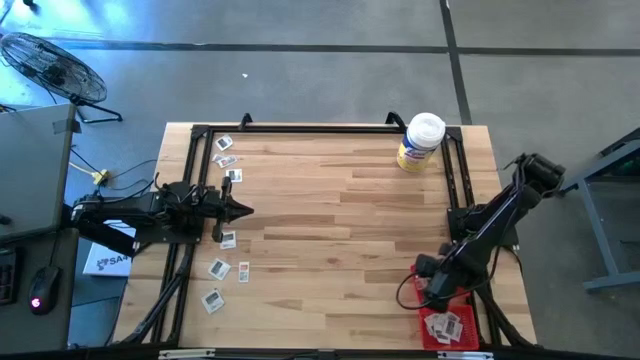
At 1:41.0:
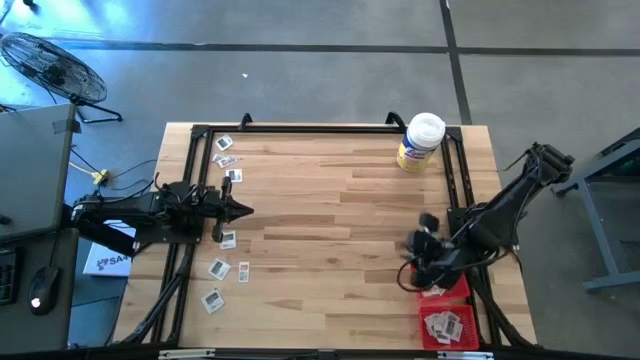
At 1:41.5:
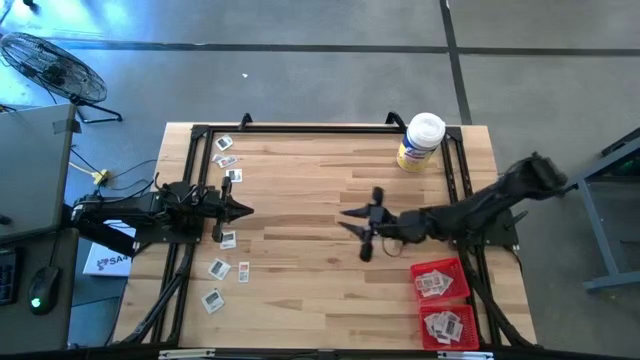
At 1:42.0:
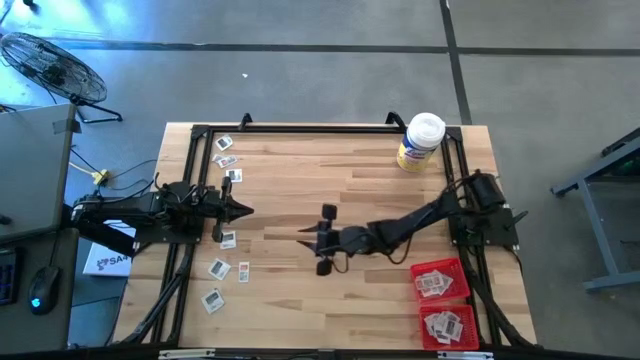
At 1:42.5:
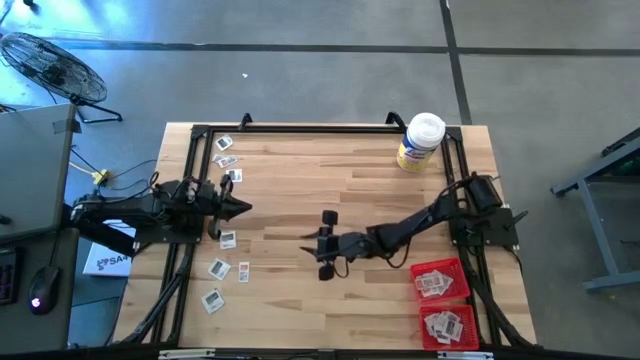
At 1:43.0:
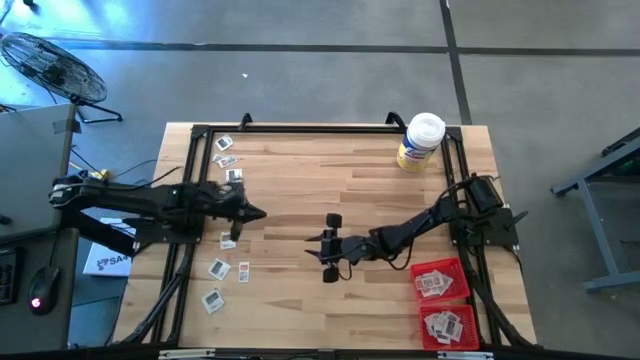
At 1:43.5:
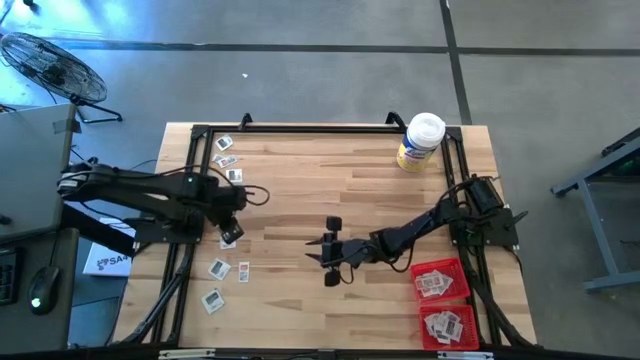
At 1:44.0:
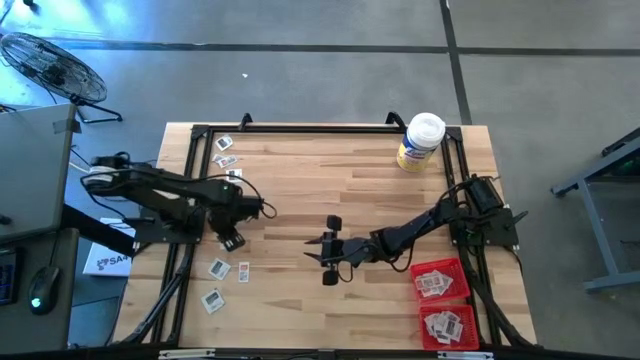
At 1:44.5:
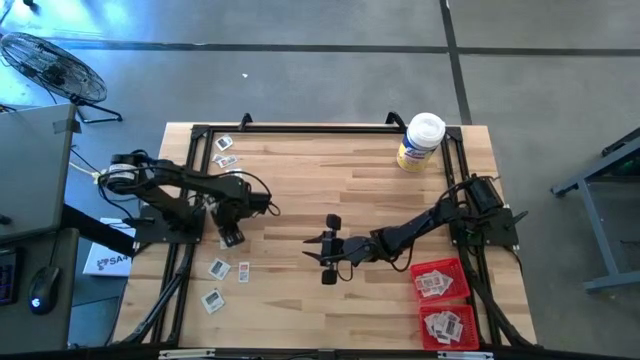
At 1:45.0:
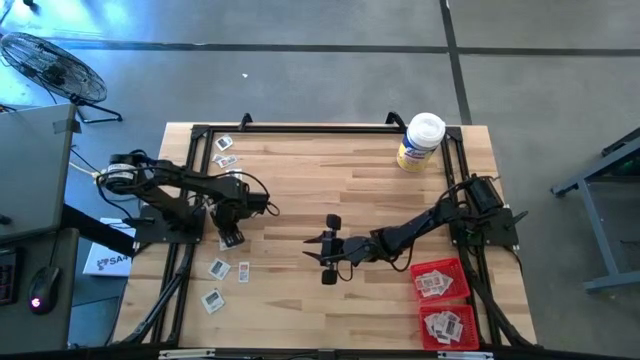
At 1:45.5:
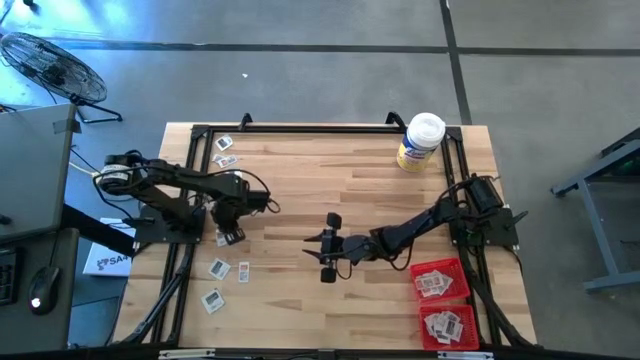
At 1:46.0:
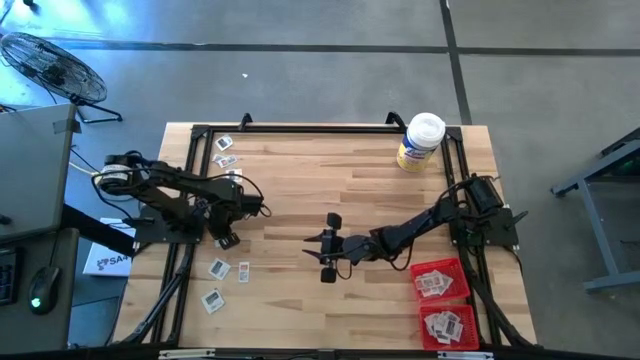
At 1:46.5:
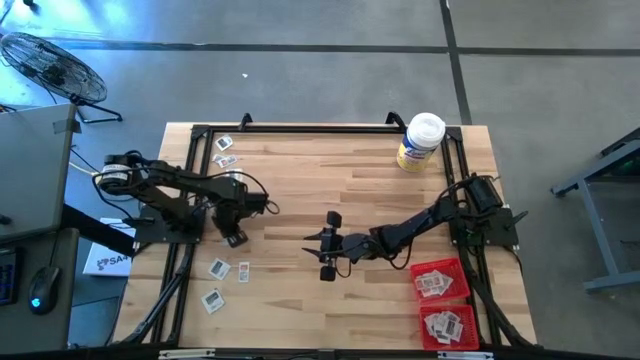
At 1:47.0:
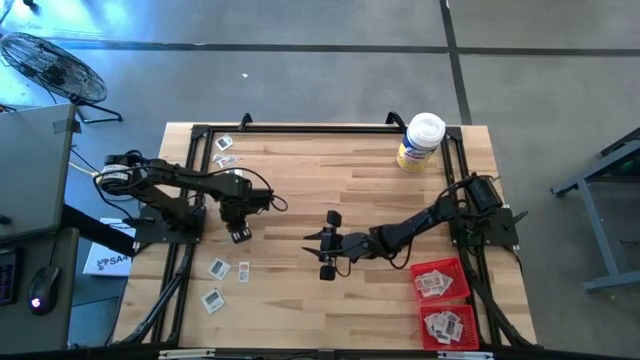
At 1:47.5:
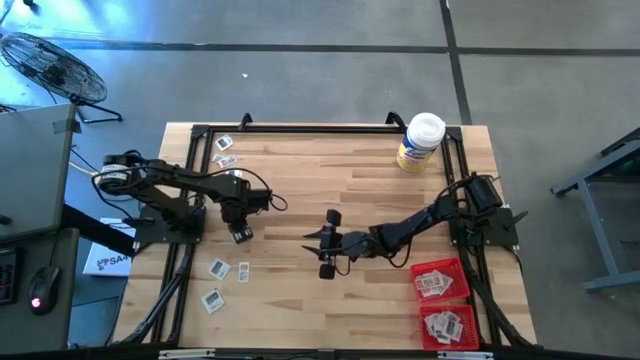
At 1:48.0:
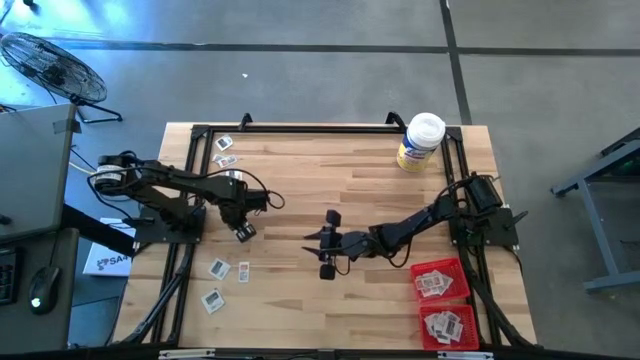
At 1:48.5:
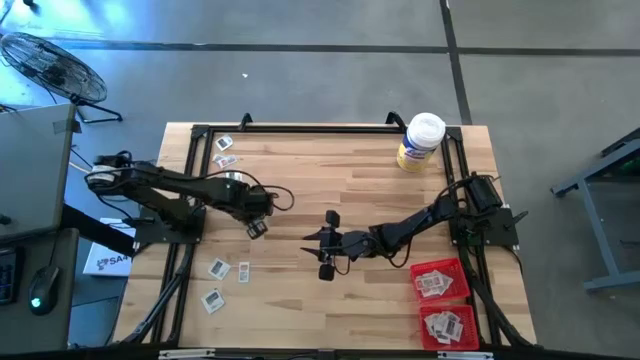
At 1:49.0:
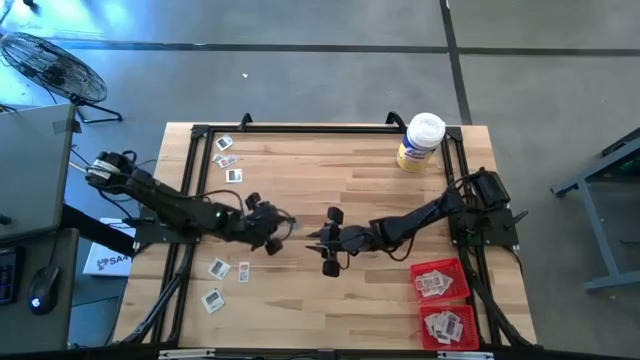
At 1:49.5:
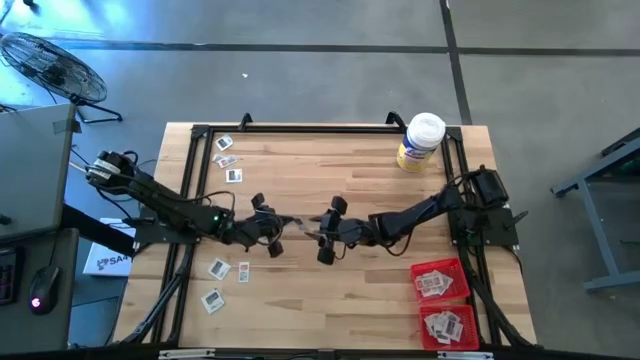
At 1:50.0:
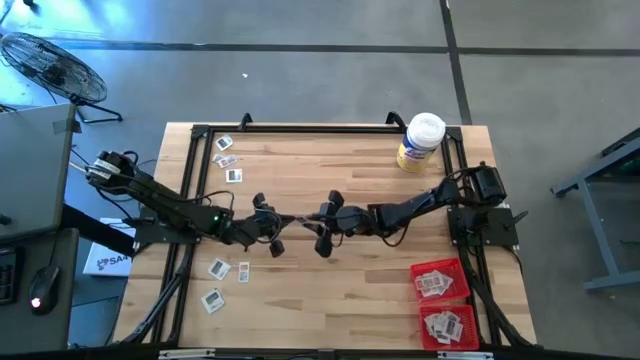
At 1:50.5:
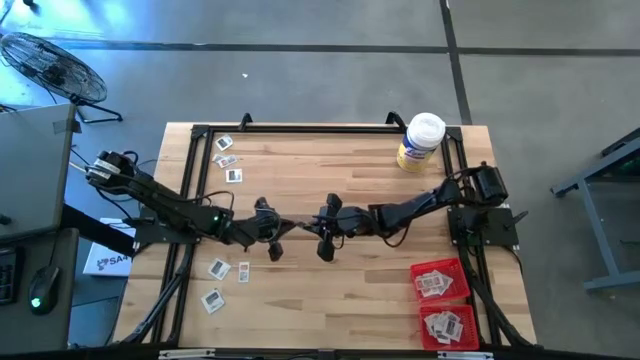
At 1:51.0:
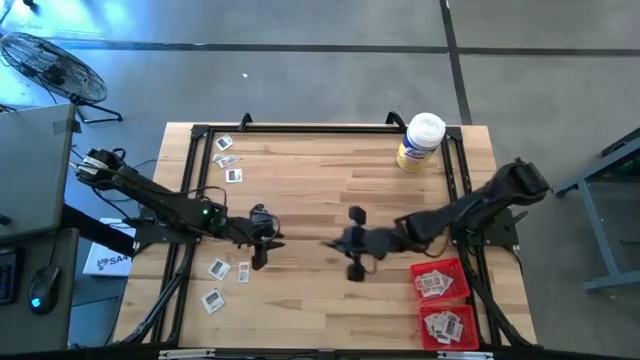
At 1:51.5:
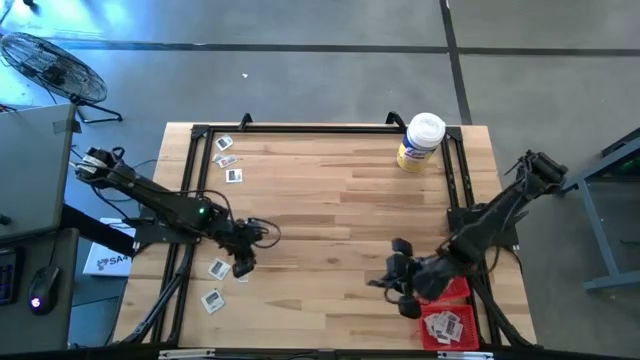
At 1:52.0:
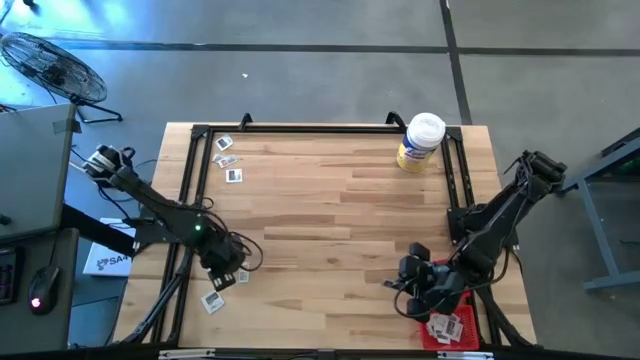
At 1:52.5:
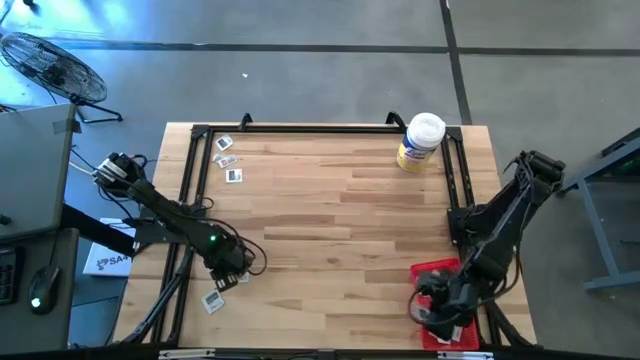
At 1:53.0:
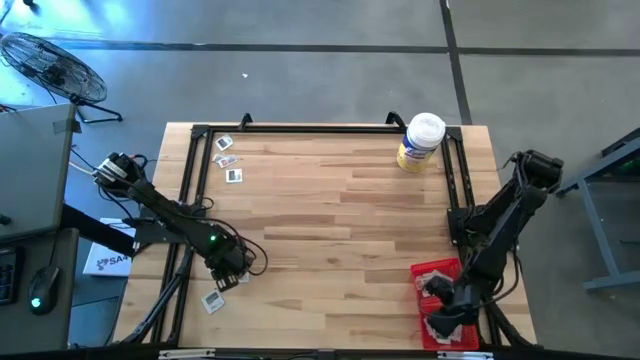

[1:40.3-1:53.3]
Task: Pick & Place First Aid Supplies
Put the white towelette pack into the bottom red bin

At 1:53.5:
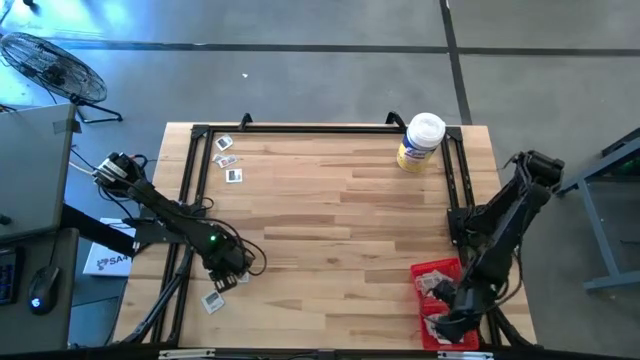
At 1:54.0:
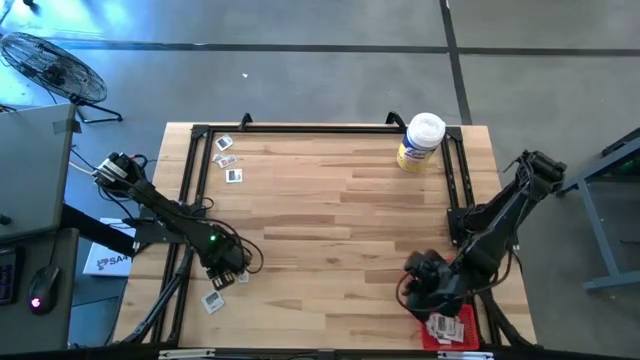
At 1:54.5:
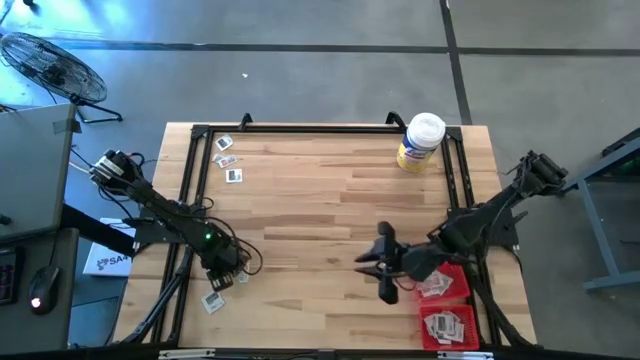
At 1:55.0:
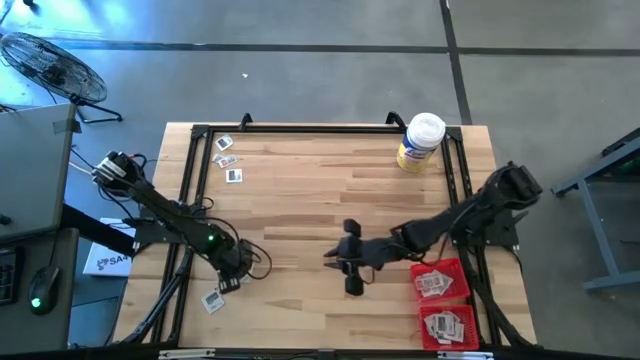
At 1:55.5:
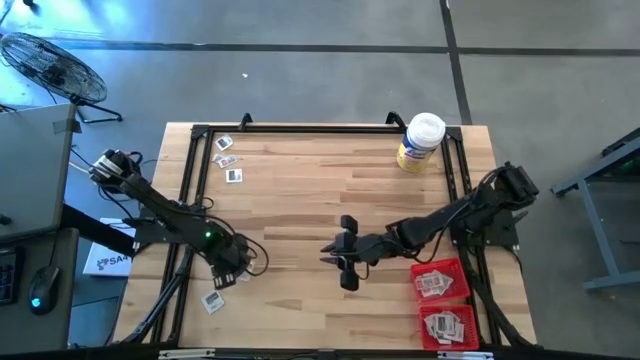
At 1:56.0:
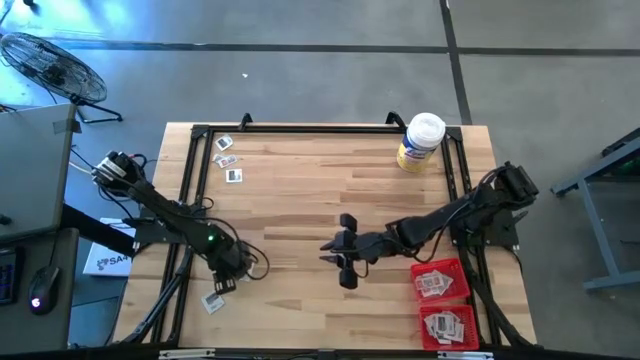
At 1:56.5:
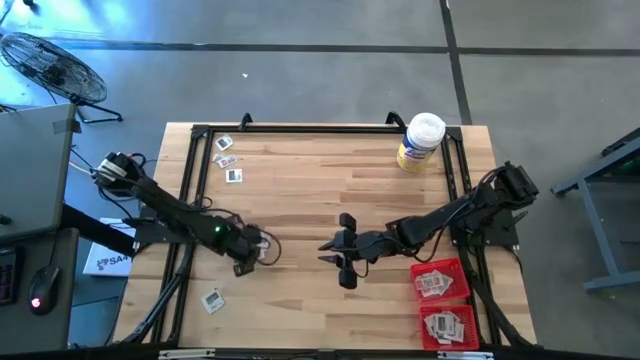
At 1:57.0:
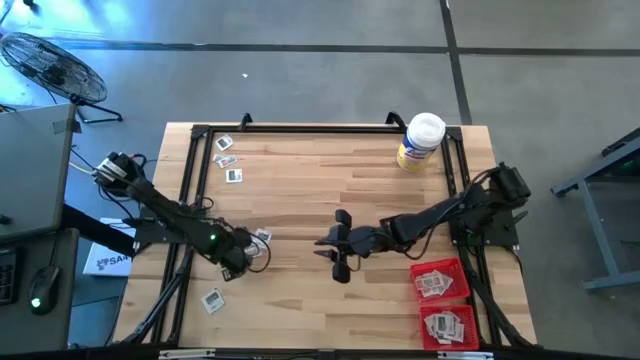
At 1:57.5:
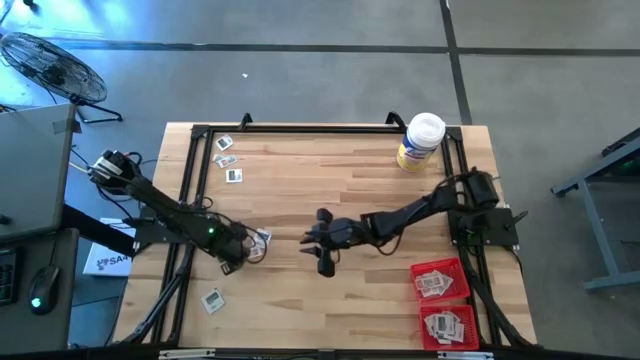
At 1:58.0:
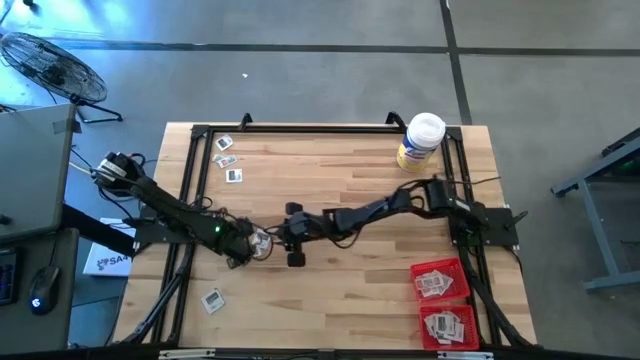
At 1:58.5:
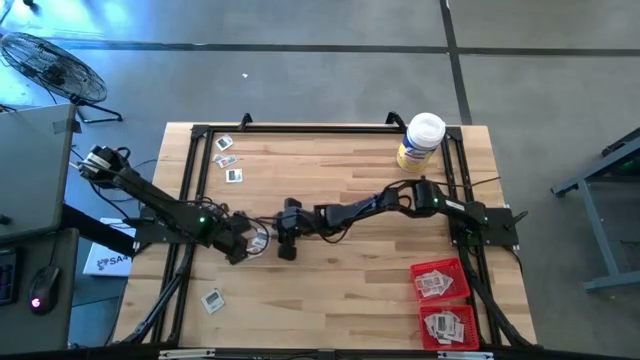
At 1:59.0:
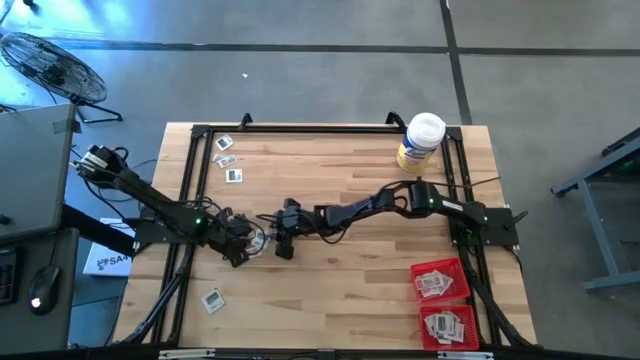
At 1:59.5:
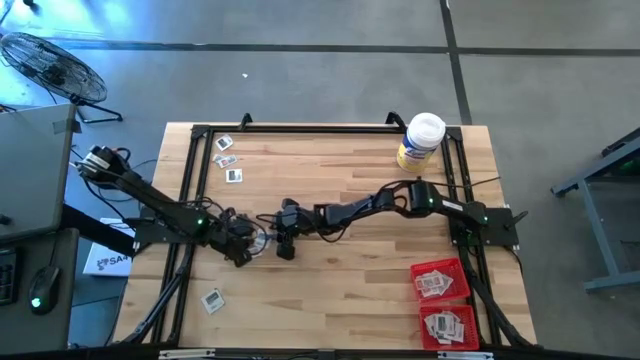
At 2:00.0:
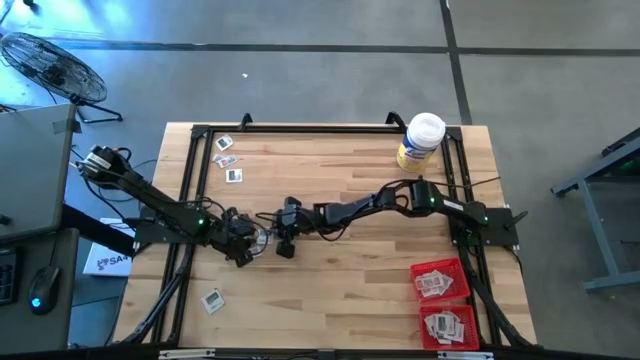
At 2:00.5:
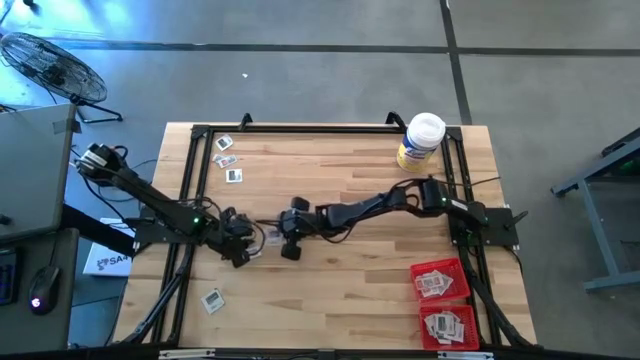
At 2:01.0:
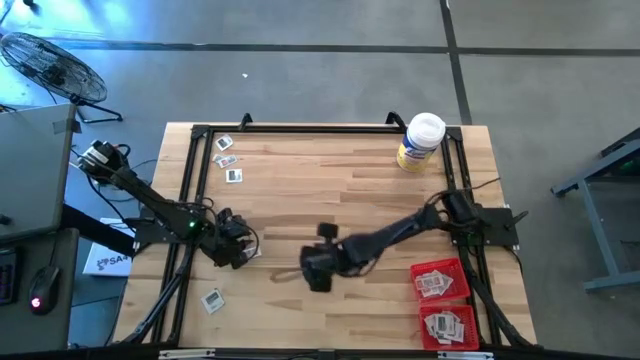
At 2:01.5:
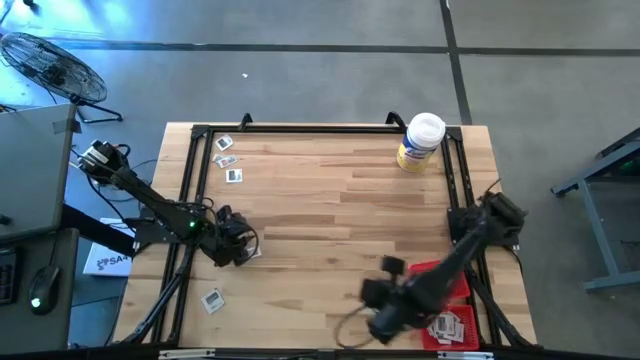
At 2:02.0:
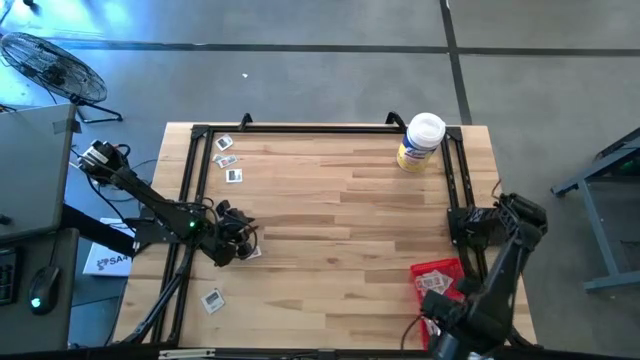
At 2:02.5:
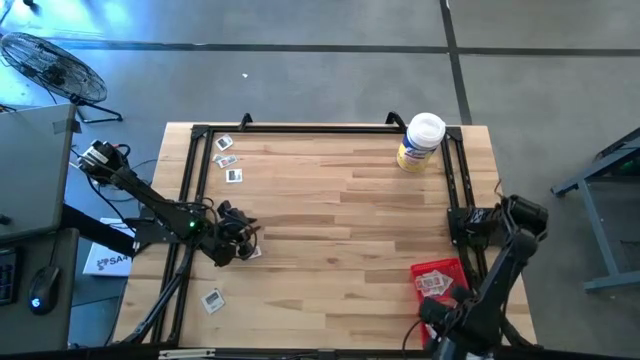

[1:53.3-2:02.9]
Put the white towelette pack into the bottom red bin
